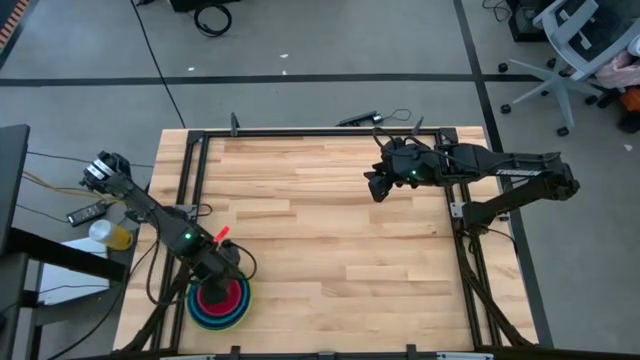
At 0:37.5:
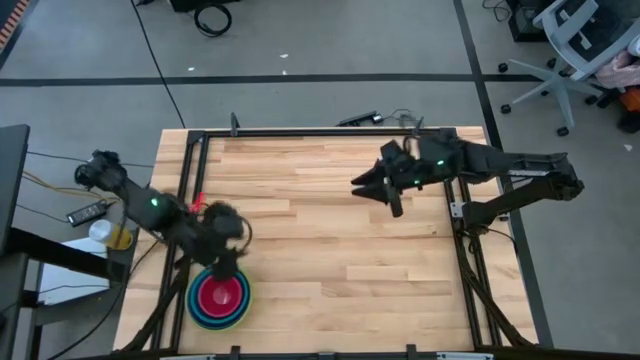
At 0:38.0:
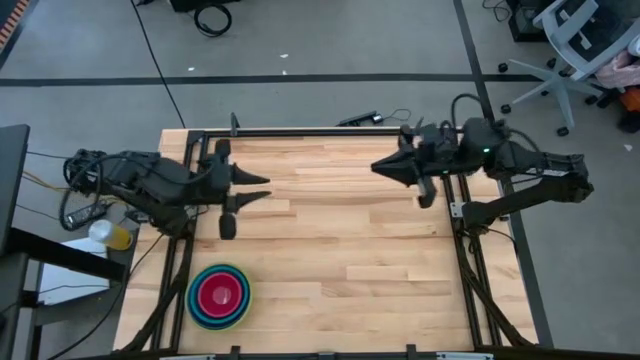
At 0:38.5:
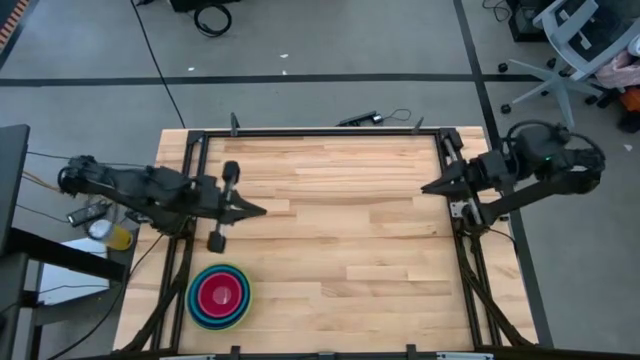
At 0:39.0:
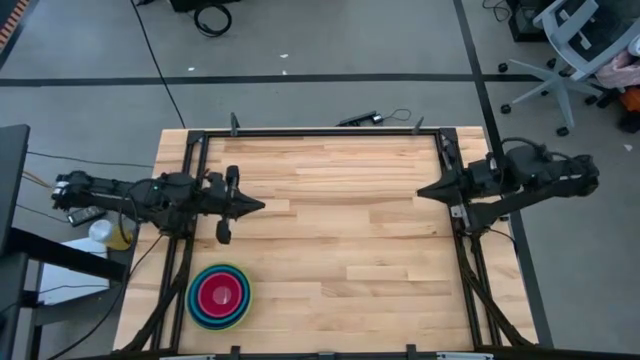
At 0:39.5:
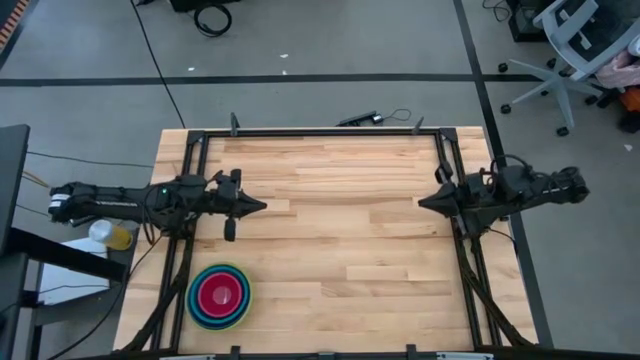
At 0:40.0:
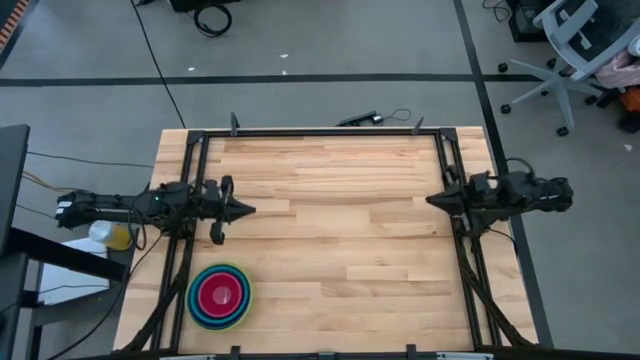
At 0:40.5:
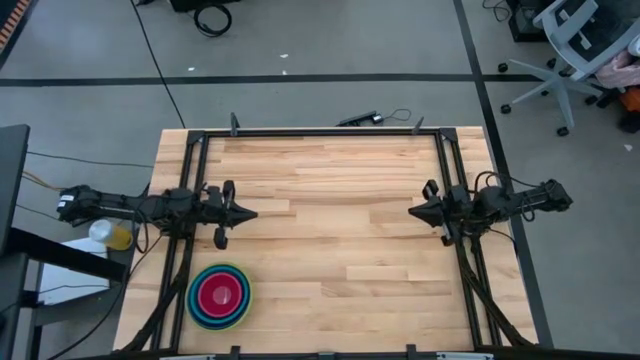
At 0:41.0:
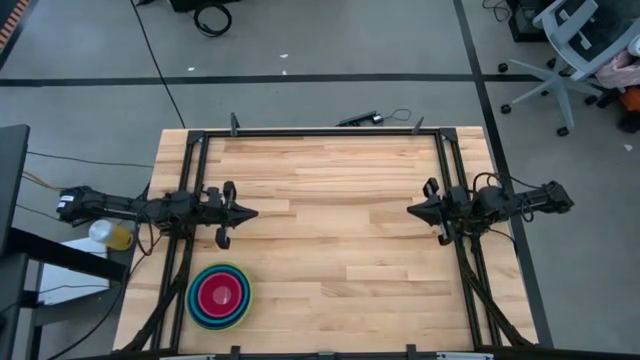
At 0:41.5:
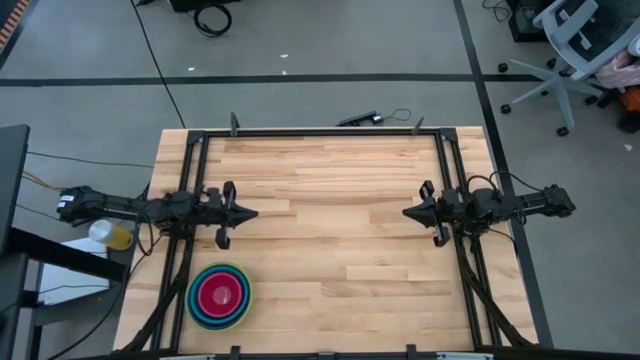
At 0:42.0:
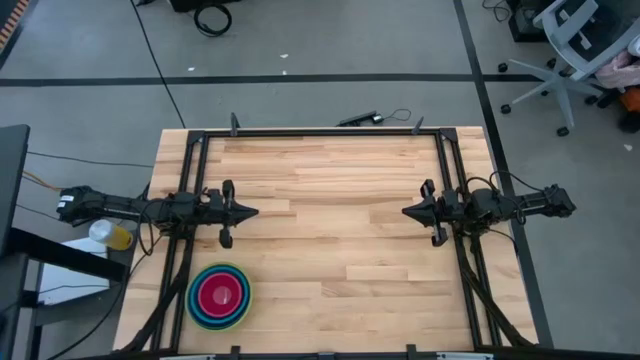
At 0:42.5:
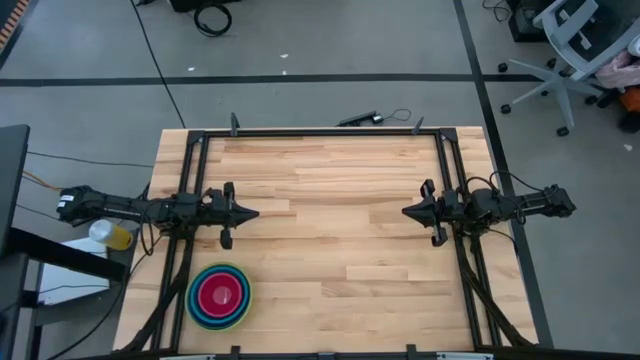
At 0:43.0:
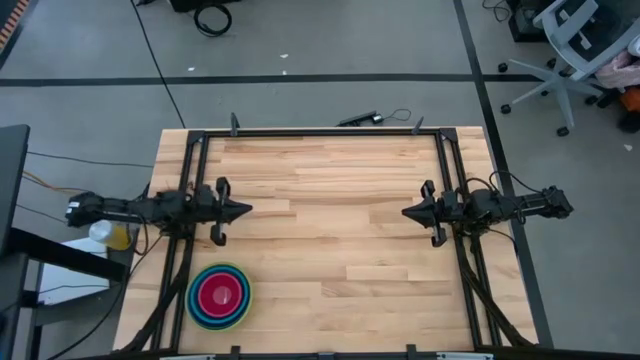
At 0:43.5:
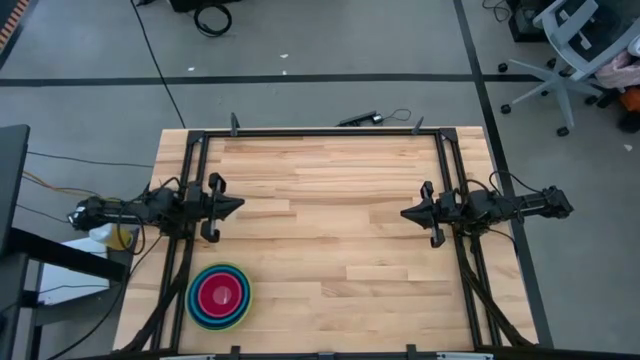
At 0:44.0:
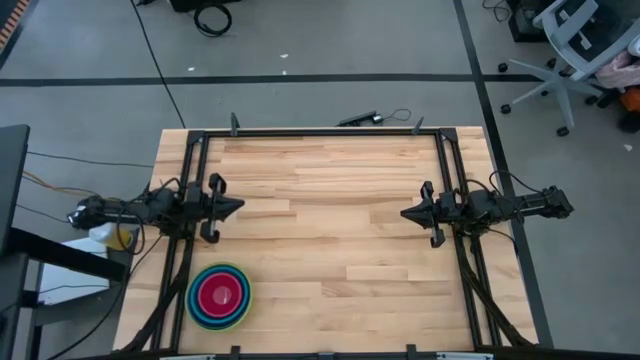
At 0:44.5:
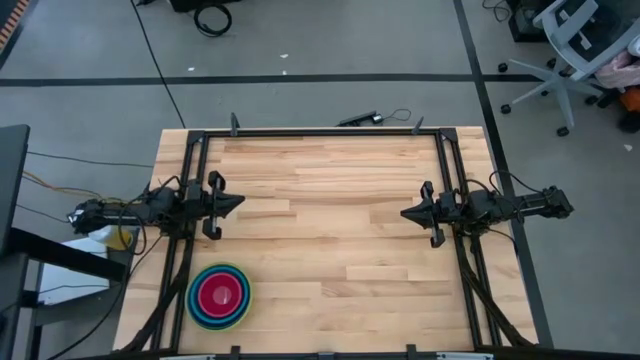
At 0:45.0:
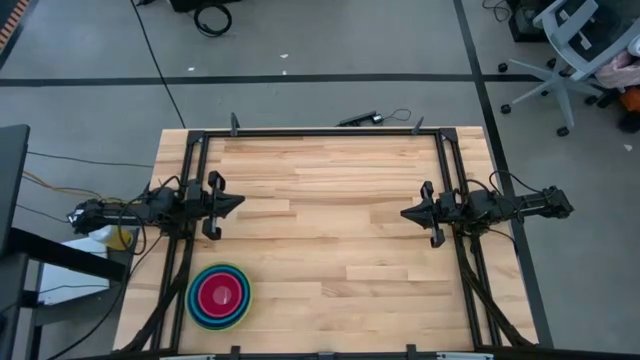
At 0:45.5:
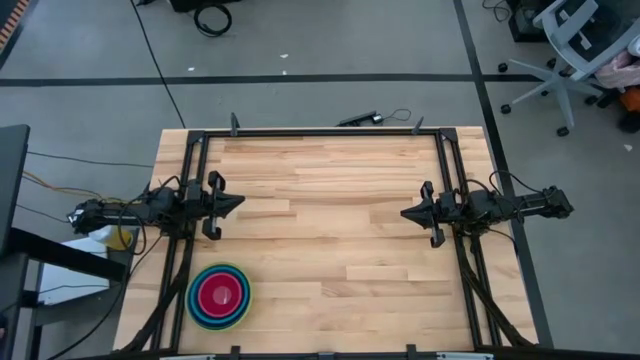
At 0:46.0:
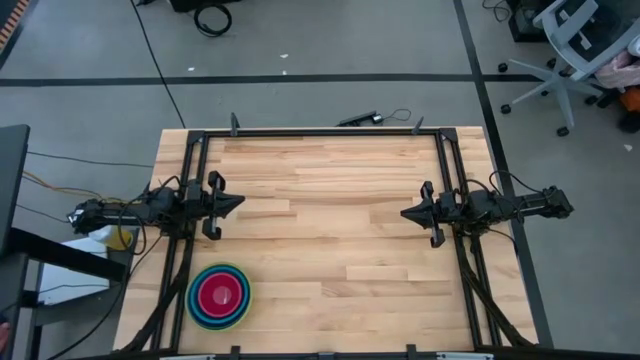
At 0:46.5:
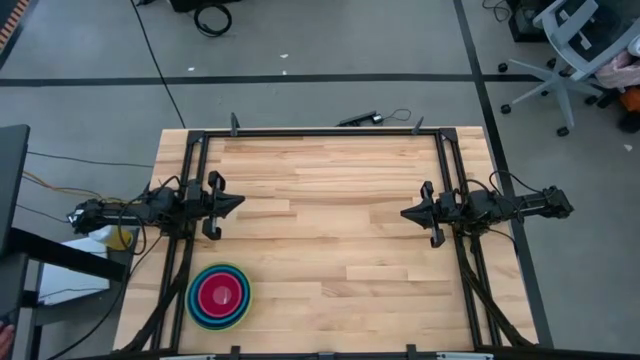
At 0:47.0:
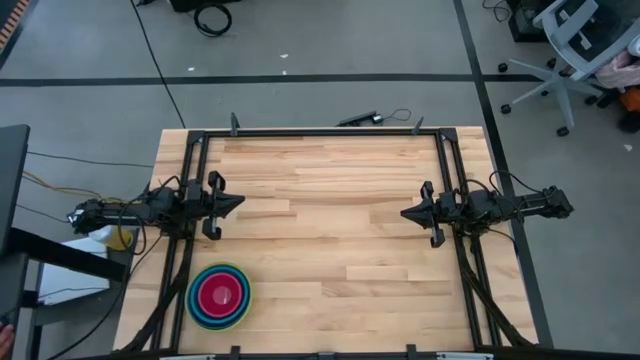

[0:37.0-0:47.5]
Return to Home Position

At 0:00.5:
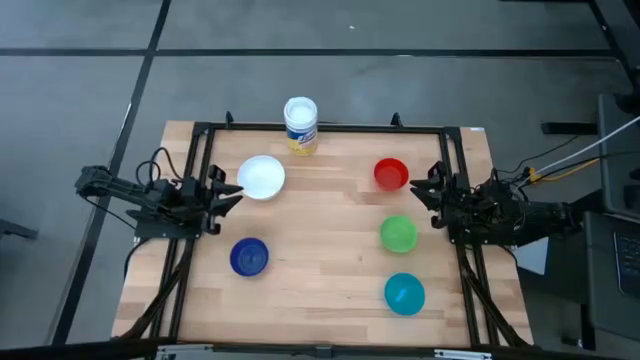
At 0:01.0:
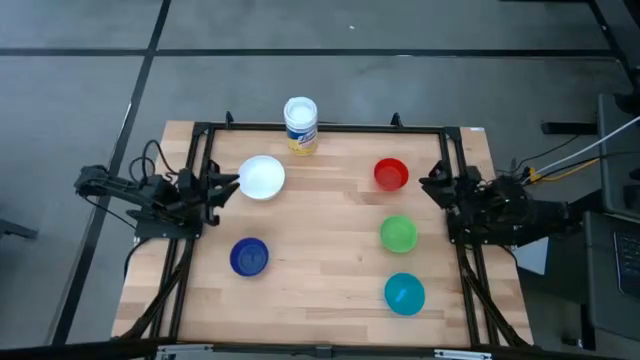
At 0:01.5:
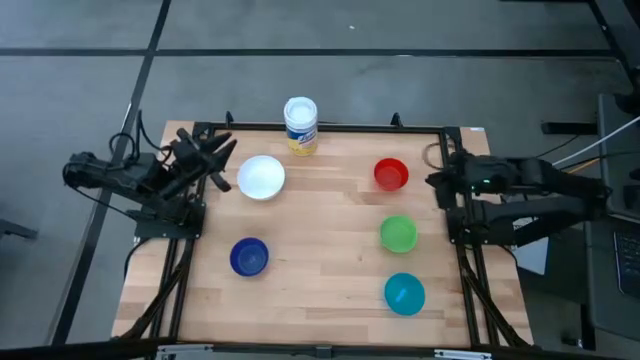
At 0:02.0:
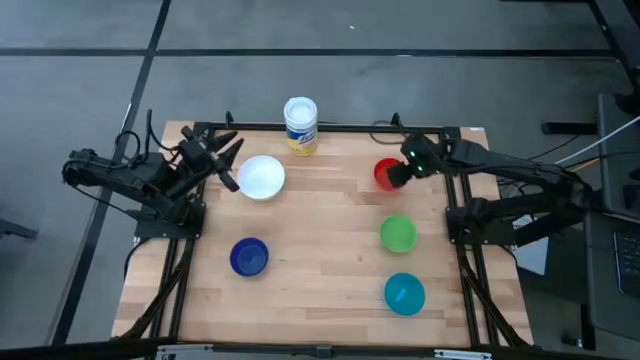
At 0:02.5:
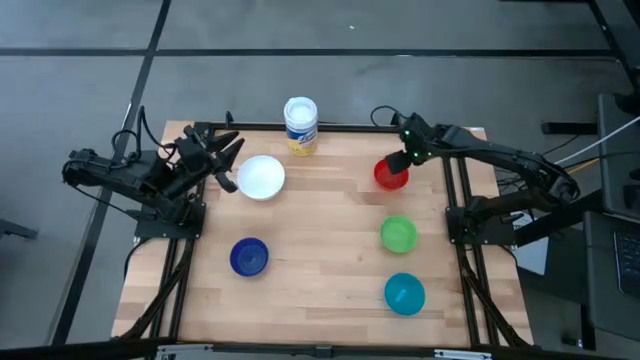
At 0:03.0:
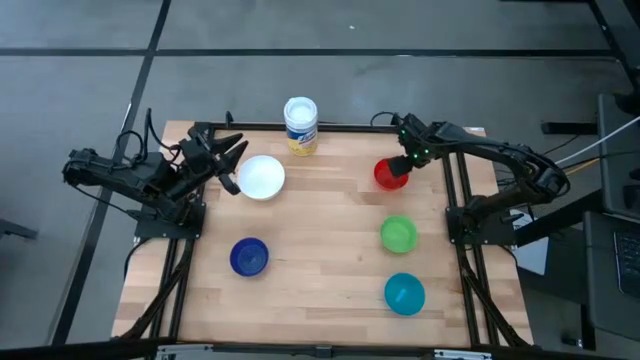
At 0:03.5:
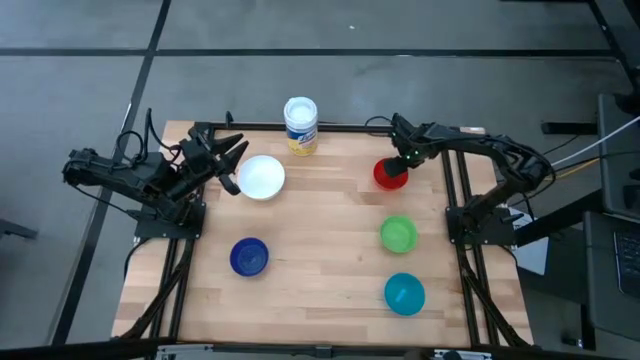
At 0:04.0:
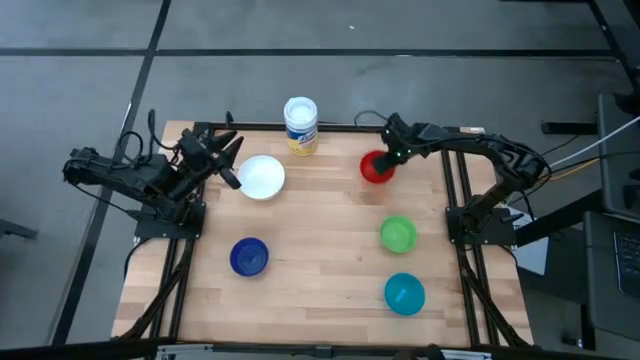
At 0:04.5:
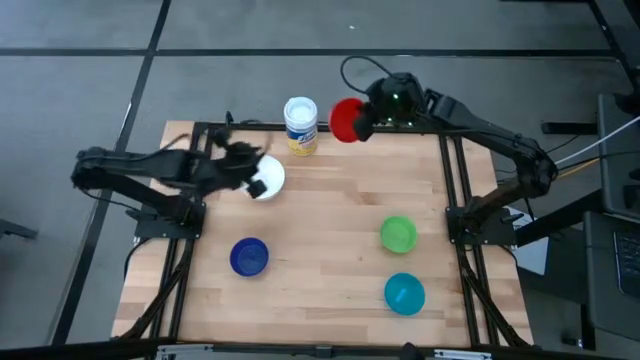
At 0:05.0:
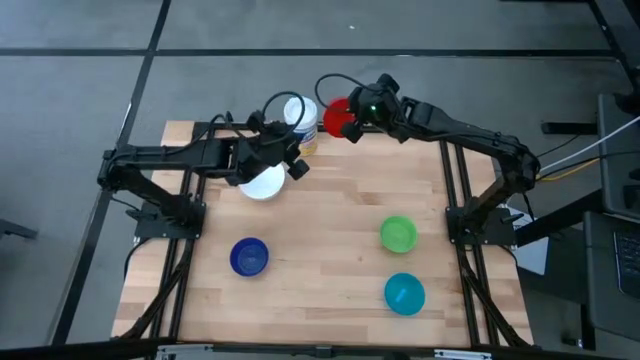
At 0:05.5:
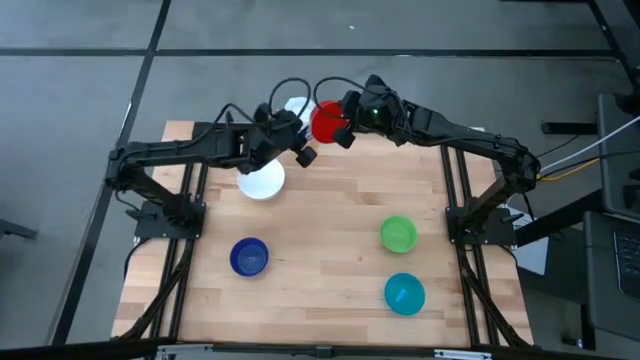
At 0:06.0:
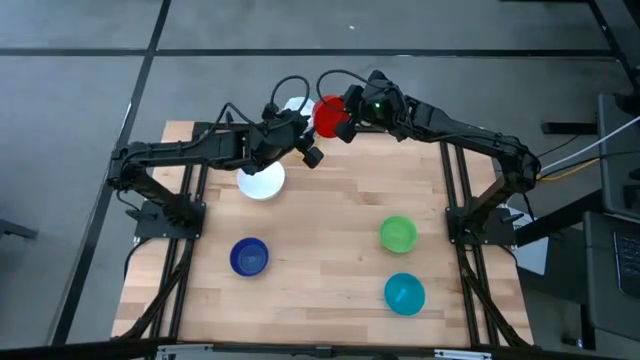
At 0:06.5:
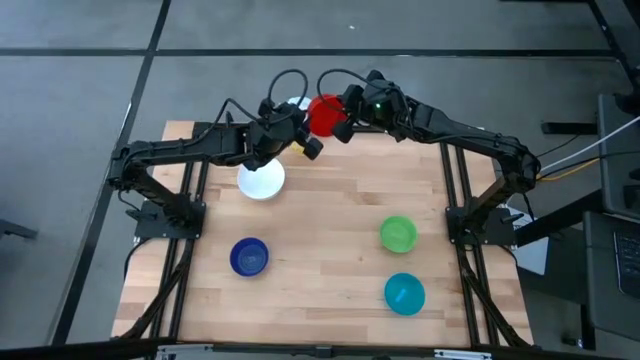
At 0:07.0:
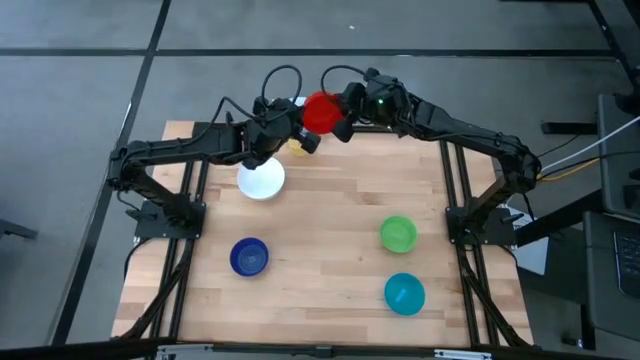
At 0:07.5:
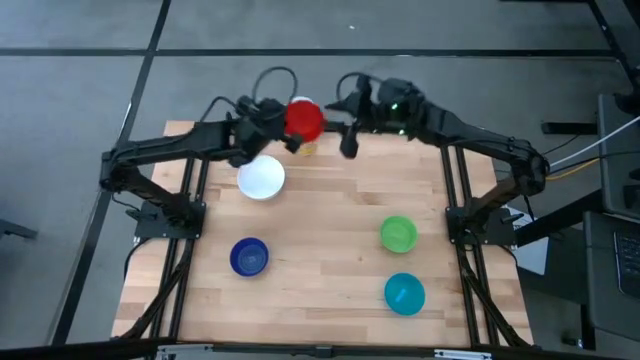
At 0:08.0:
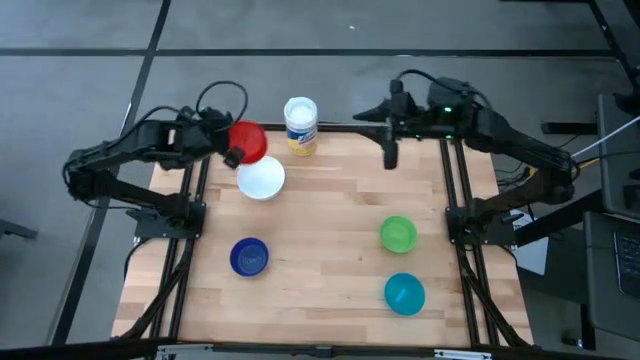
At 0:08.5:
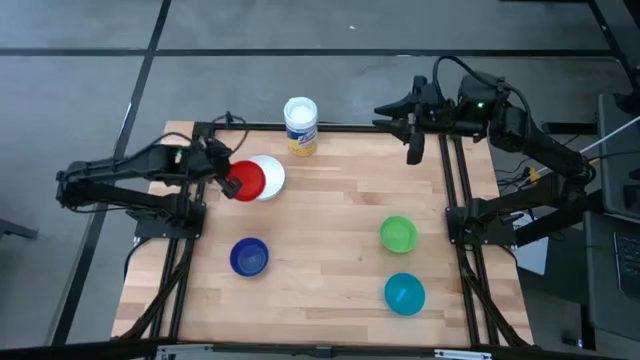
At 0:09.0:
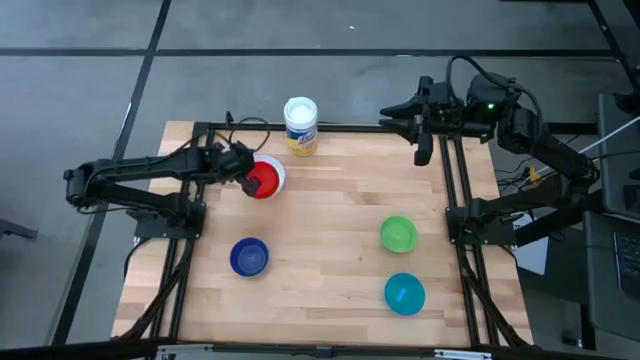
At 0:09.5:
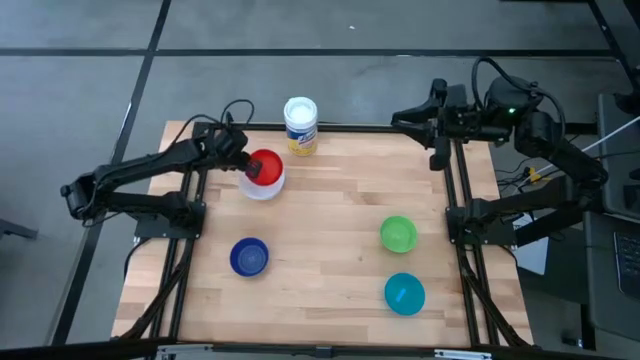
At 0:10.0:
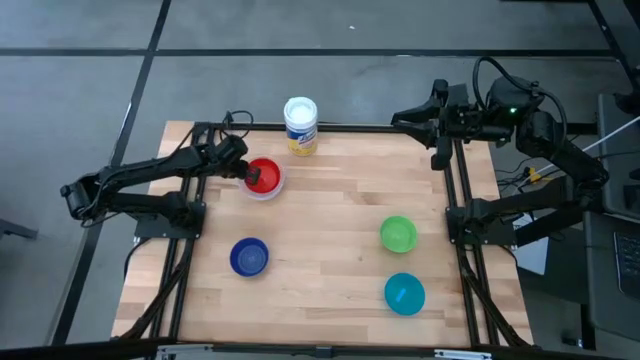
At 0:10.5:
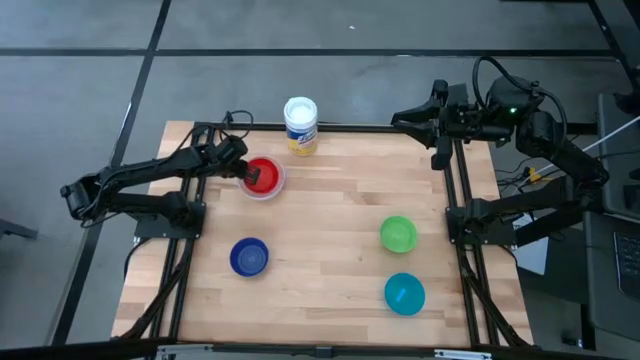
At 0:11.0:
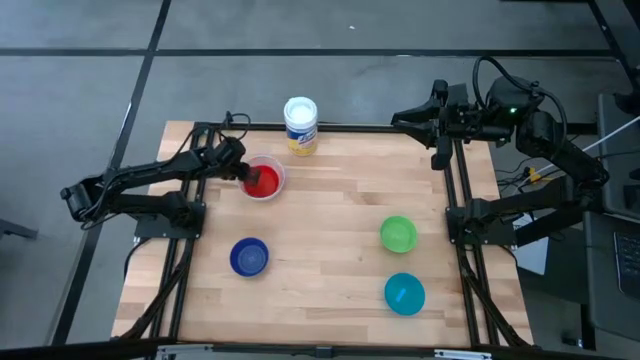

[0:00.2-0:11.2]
Stack the red bowl on the white bowl
